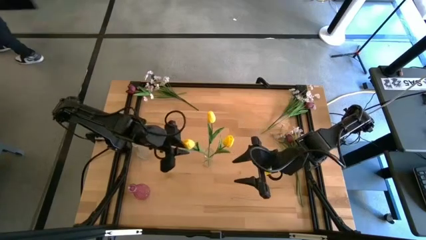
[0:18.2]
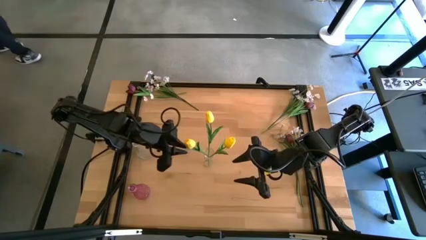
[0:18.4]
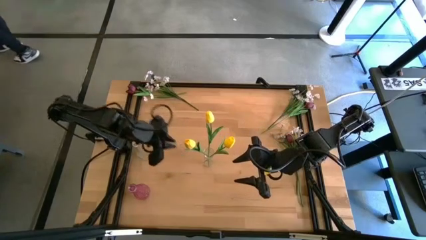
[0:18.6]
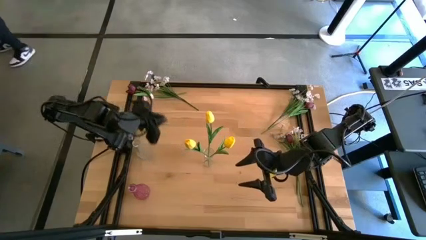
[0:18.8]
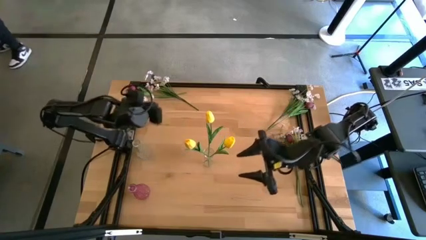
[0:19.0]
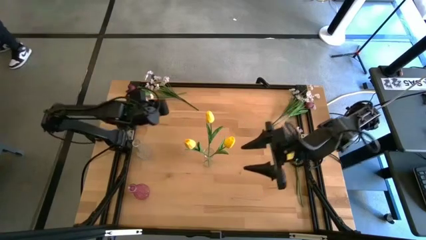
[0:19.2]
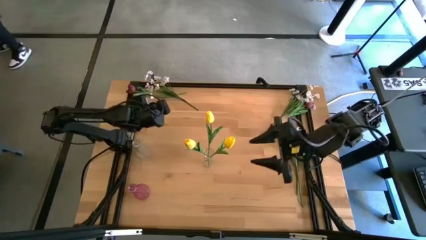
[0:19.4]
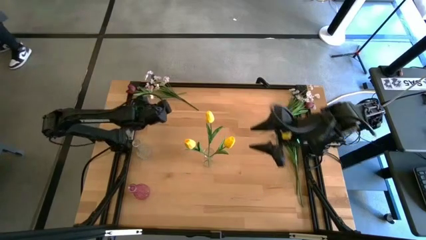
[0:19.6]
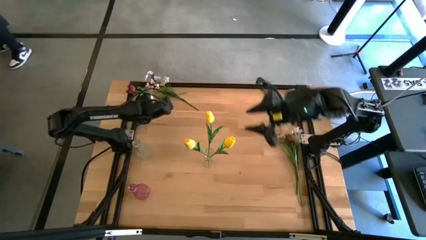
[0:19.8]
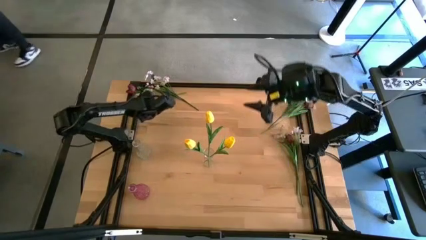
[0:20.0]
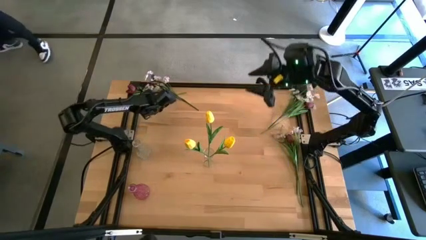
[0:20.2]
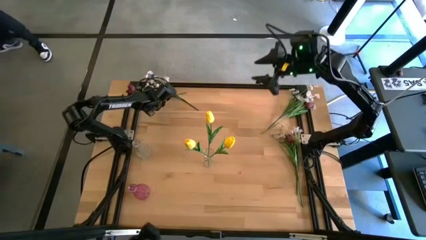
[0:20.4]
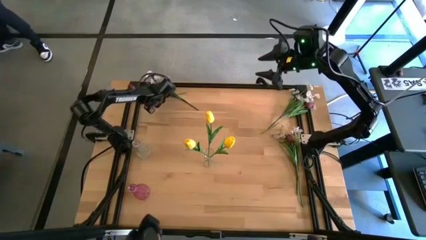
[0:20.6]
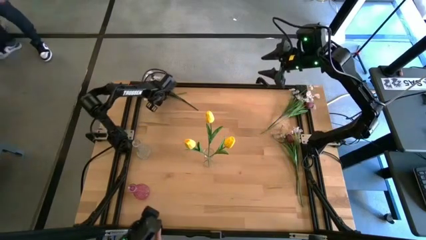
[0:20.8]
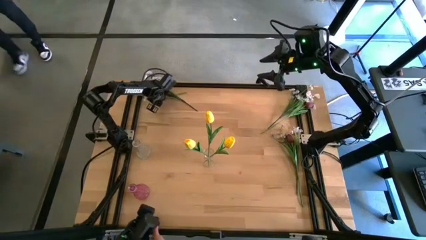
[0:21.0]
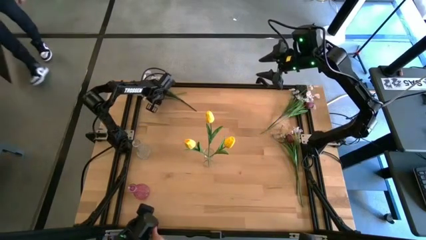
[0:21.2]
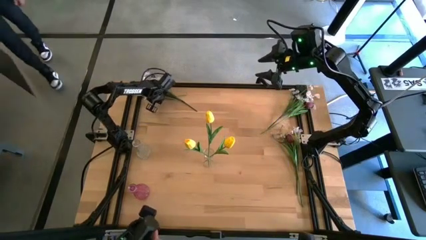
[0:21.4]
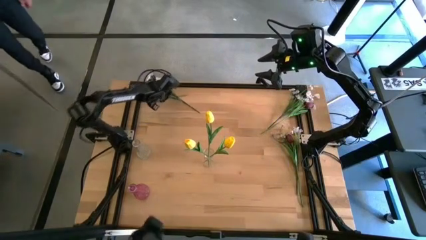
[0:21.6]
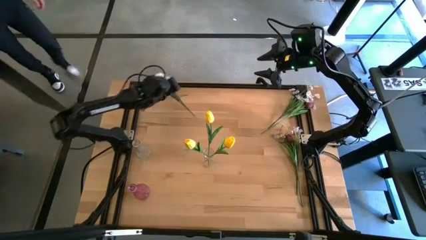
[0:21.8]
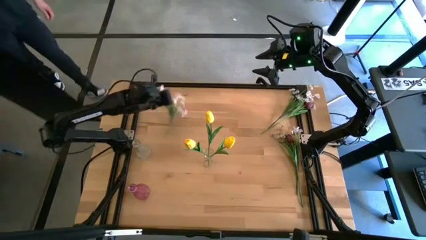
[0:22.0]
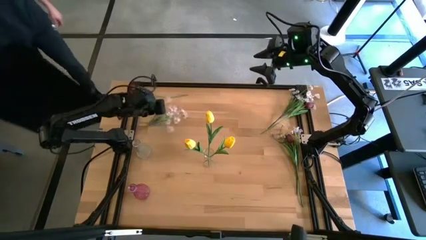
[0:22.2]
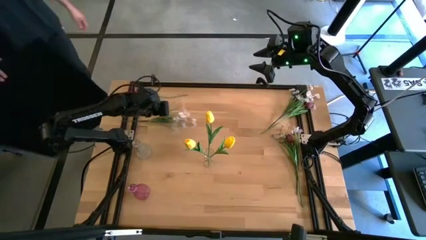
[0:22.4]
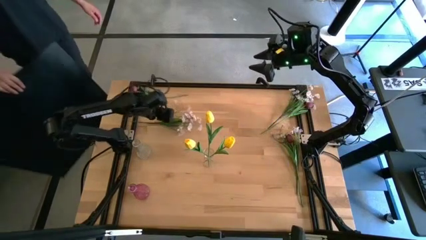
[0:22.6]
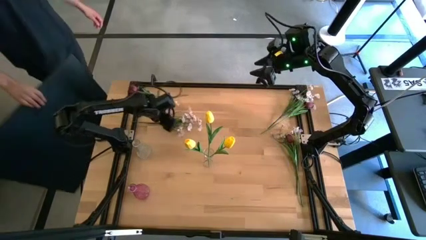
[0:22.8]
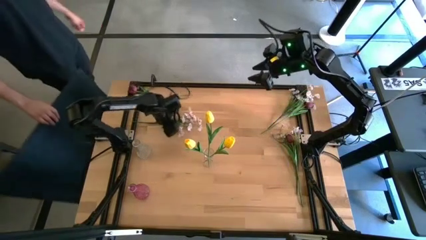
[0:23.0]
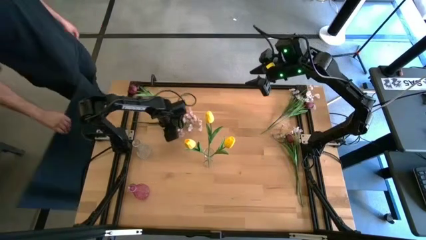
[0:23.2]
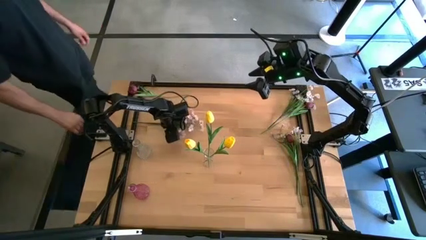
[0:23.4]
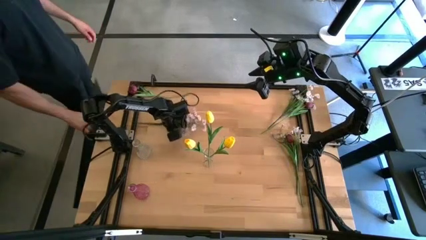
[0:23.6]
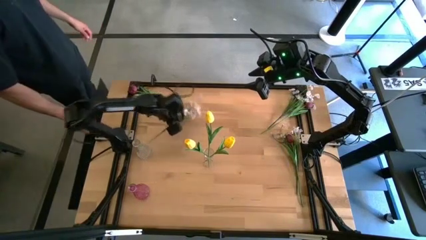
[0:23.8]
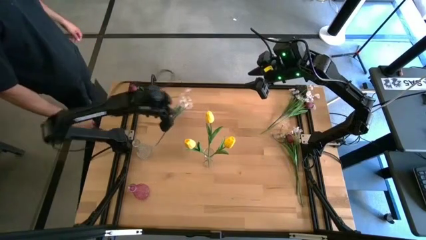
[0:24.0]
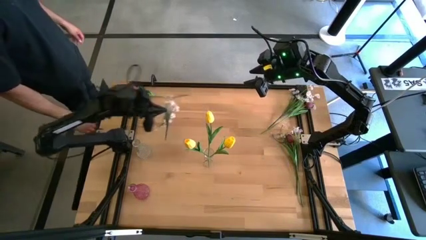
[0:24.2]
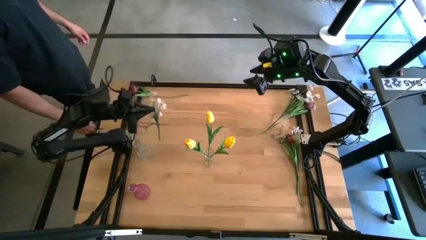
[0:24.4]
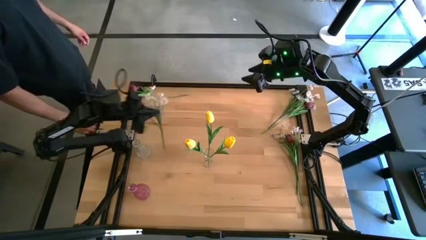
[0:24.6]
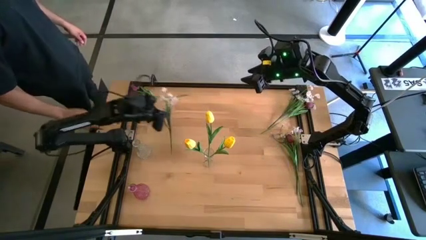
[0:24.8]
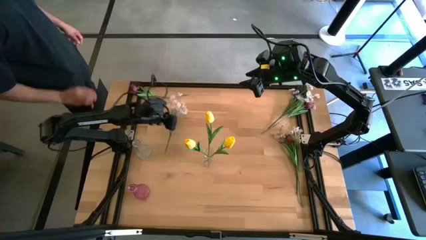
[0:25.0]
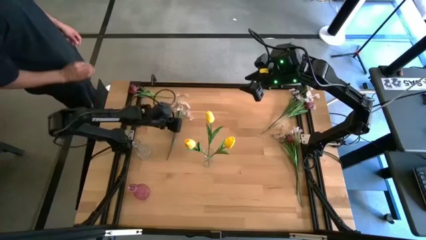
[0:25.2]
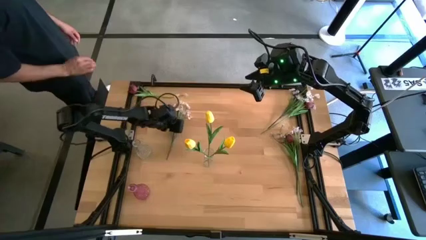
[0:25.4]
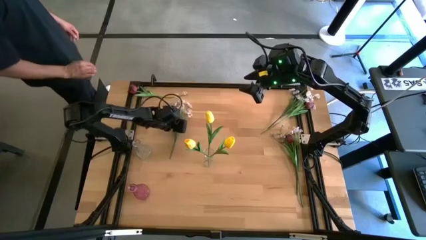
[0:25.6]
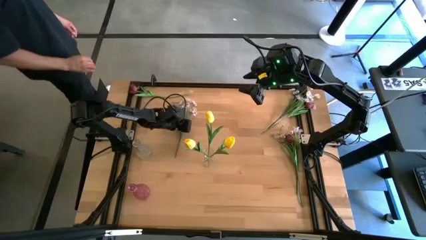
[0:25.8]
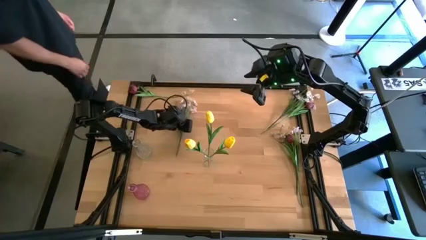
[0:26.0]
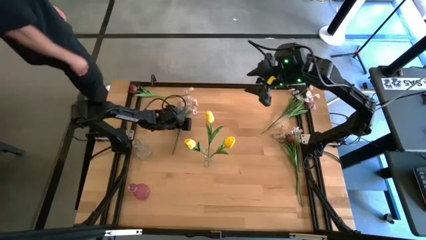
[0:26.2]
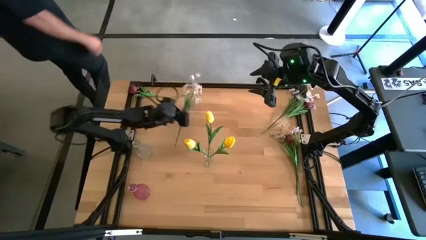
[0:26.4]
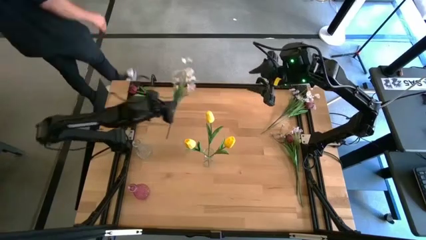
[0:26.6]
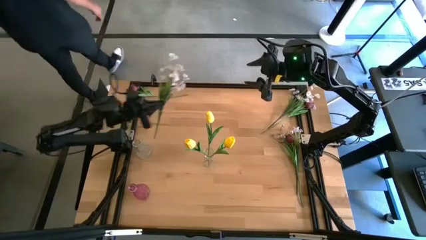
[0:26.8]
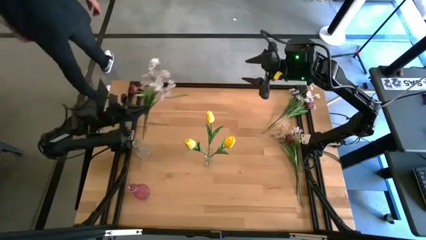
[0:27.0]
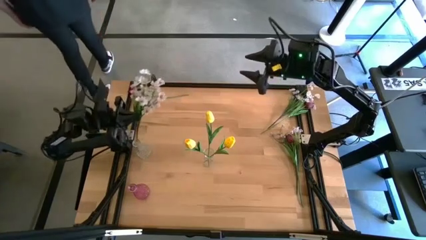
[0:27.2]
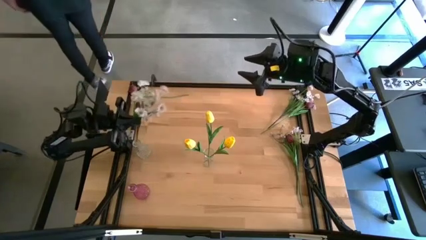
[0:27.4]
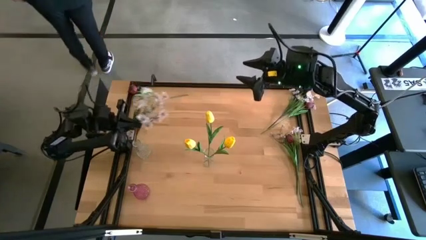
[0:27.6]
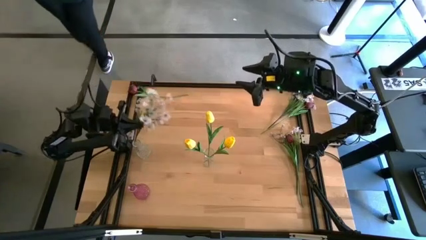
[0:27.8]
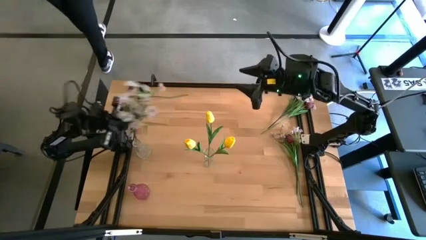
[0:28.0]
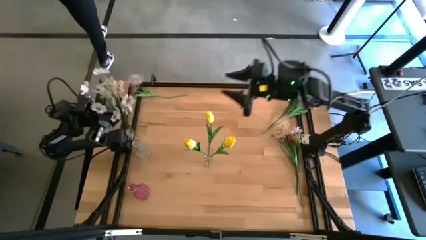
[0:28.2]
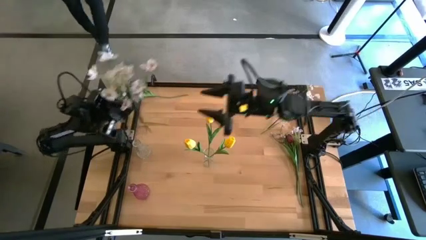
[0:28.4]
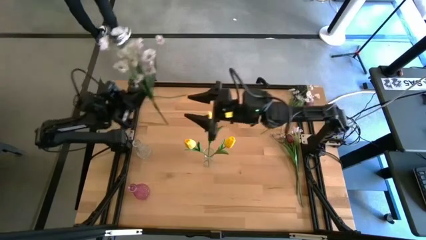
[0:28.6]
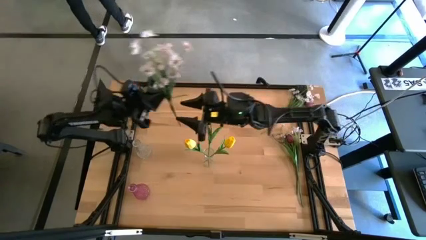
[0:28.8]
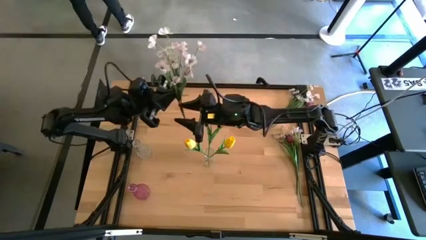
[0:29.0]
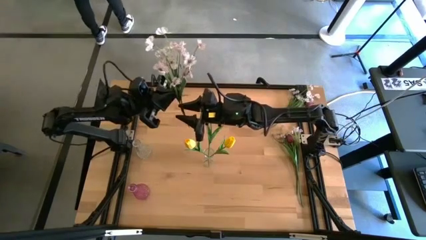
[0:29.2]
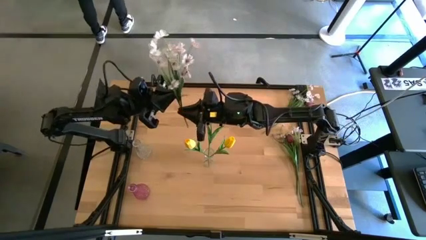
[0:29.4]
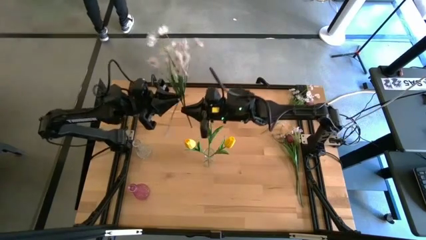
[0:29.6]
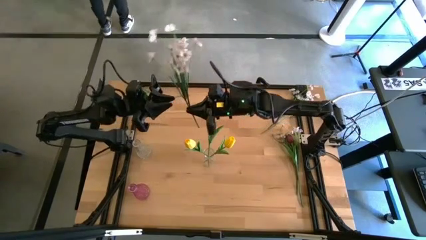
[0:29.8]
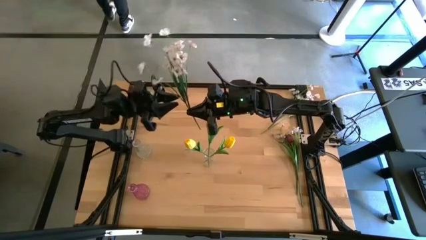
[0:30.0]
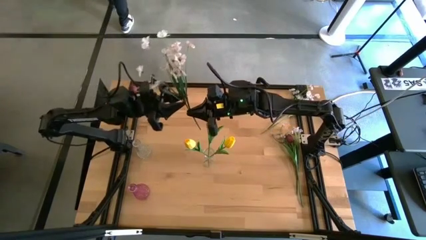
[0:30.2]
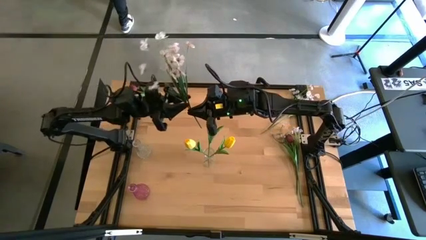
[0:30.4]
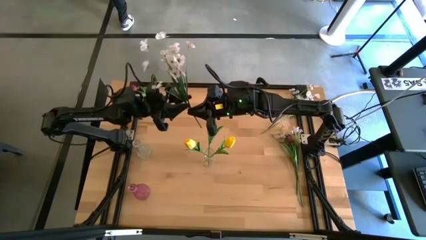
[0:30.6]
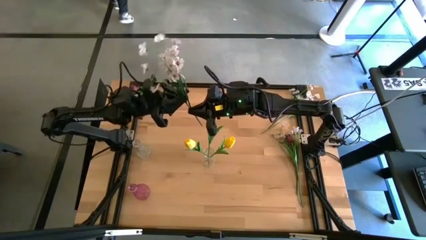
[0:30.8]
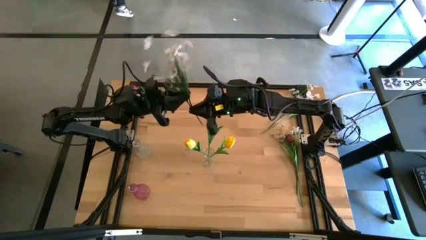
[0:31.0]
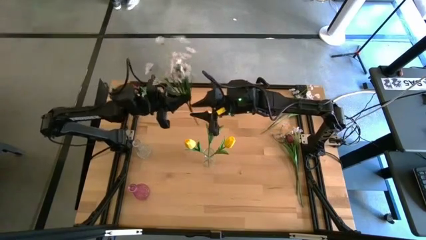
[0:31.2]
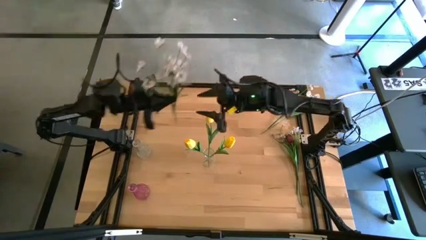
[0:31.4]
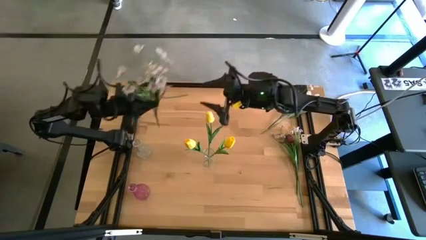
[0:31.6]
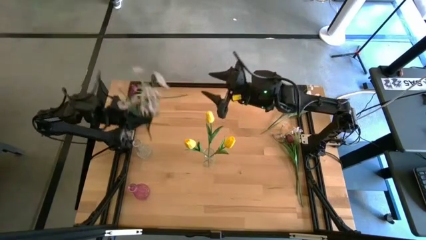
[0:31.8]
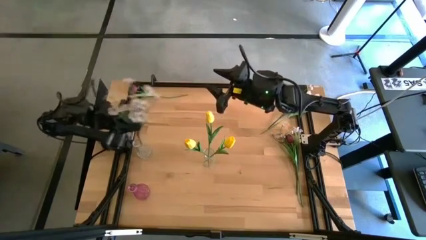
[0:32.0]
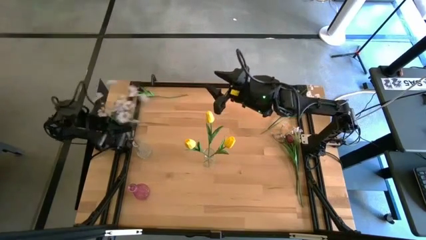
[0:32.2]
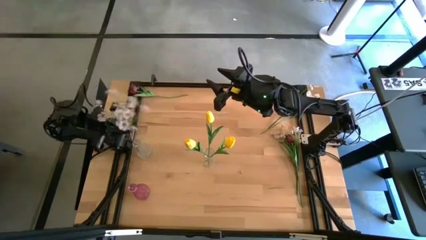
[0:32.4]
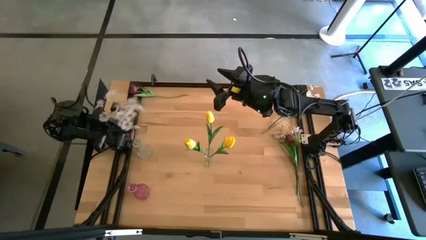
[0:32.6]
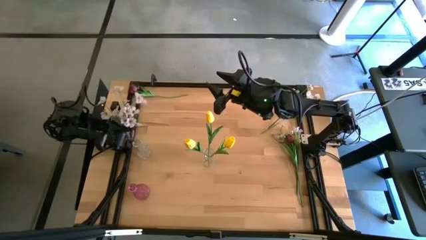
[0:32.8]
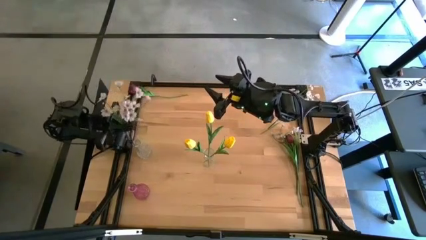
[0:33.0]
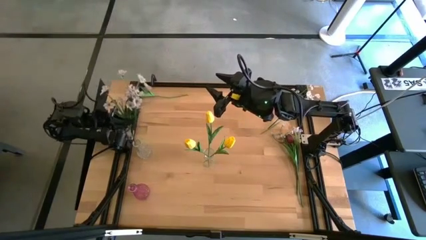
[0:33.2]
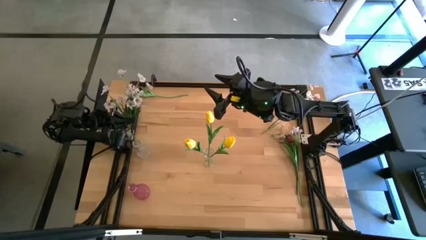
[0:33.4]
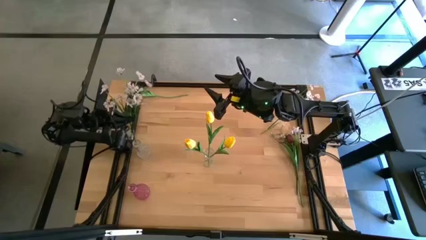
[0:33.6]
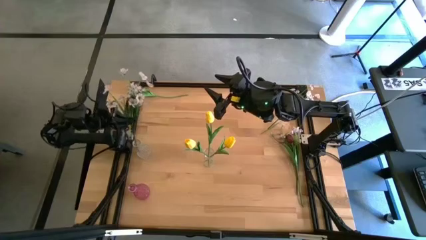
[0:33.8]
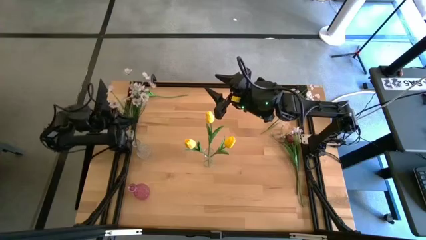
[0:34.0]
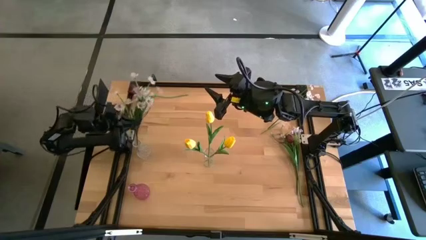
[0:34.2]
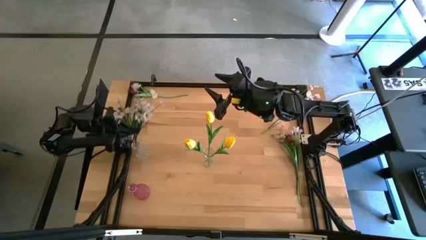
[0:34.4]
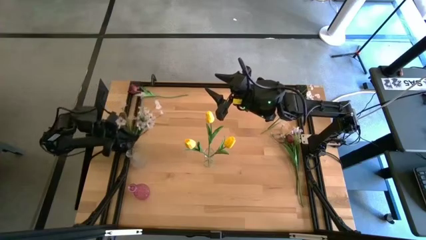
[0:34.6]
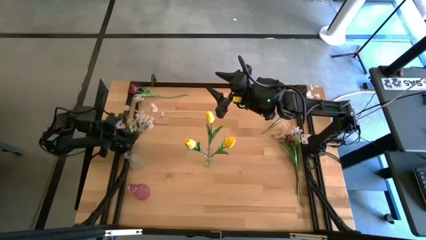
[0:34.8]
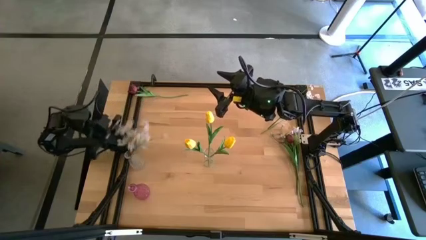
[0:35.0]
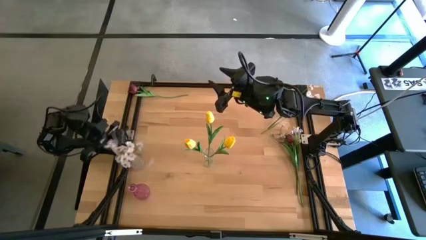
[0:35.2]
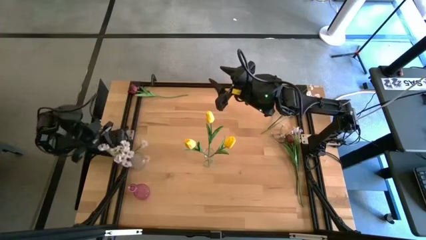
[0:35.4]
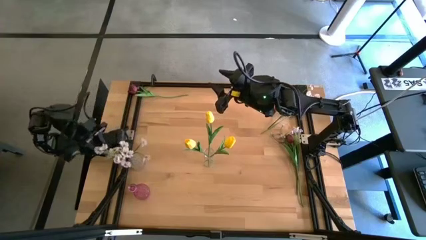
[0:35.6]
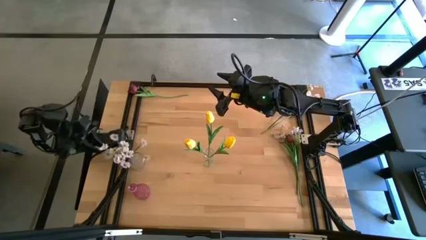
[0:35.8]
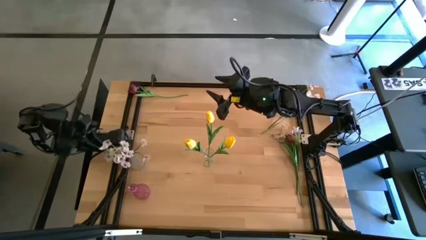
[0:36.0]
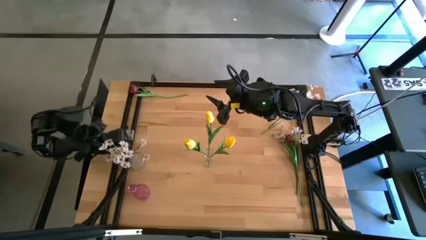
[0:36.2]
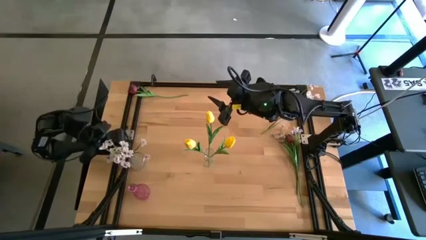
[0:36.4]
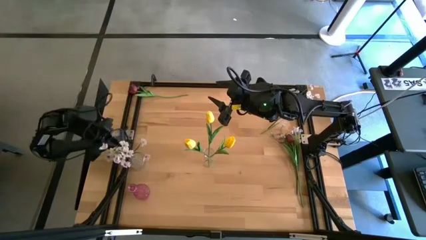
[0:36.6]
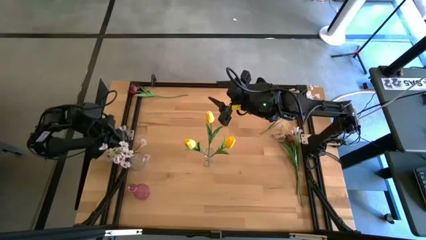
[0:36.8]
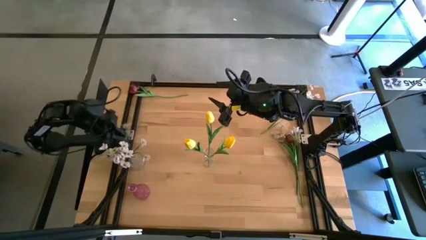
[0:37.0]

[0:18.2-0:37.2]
Task: Sort flowers into vase by color
Put the top right white flowers into the left transparent vase
